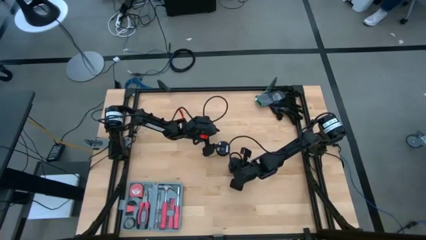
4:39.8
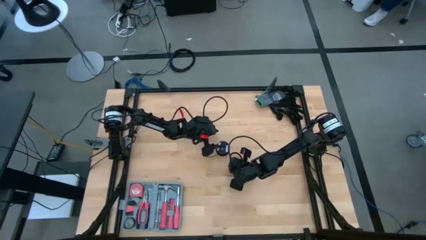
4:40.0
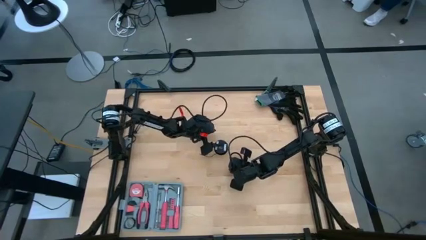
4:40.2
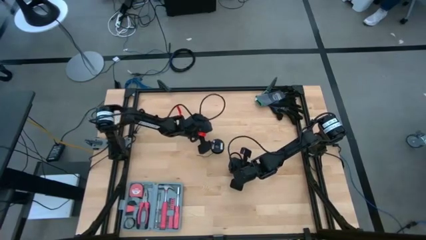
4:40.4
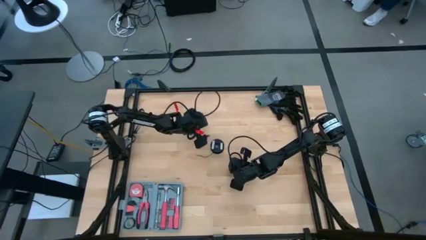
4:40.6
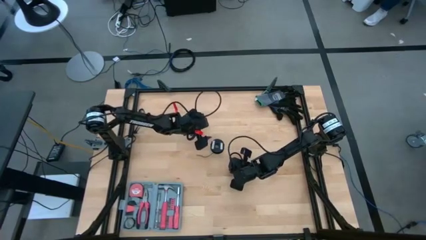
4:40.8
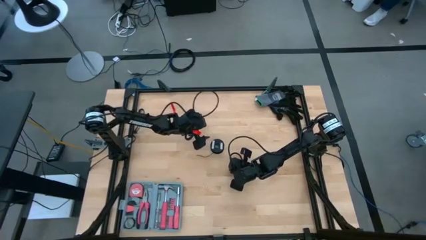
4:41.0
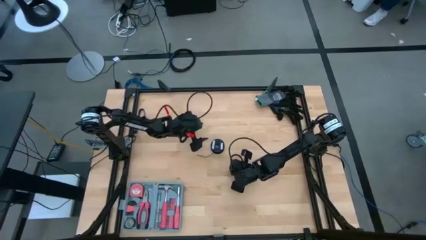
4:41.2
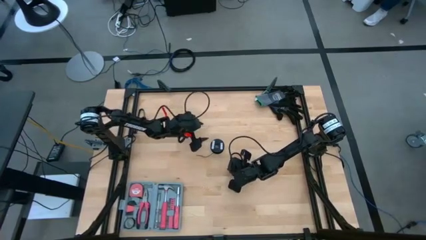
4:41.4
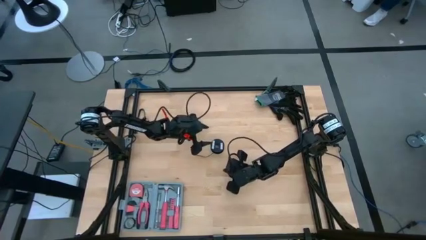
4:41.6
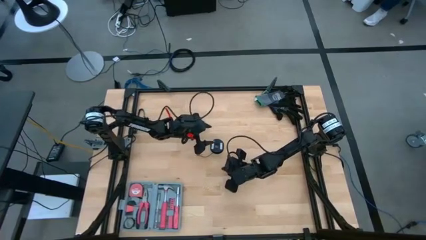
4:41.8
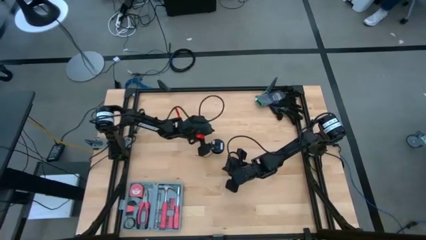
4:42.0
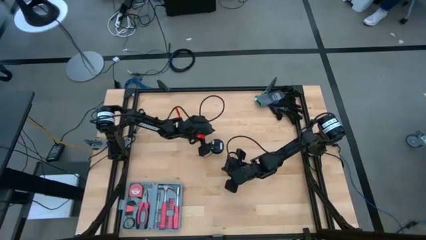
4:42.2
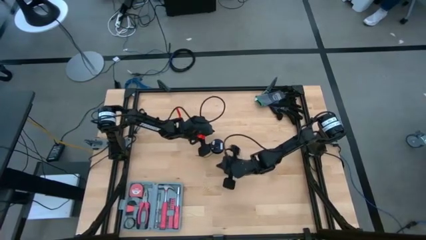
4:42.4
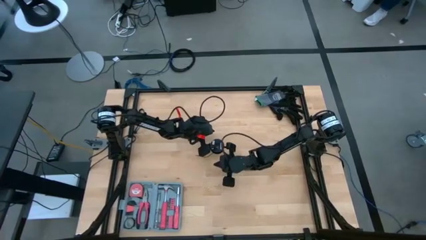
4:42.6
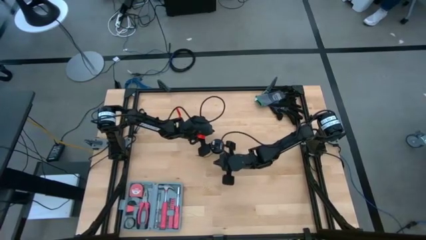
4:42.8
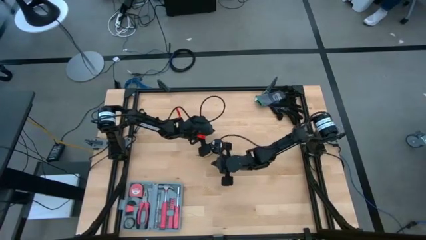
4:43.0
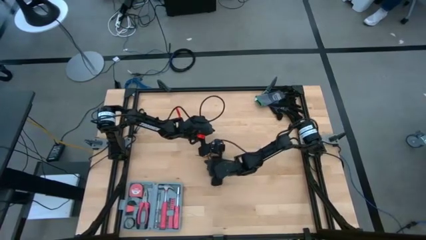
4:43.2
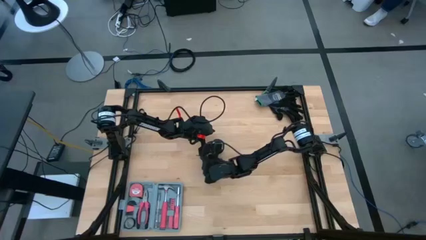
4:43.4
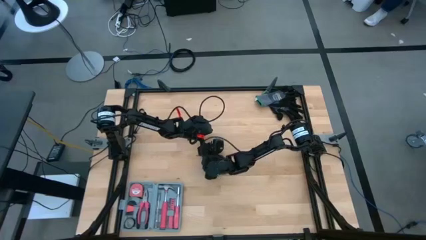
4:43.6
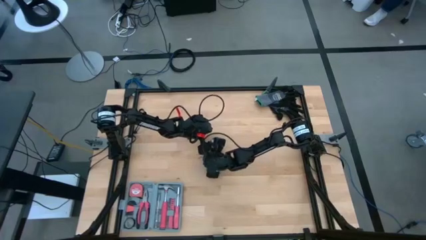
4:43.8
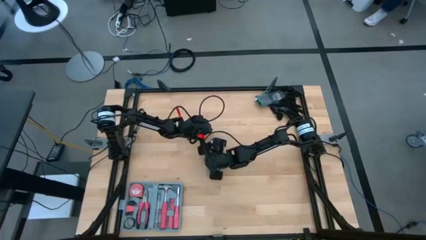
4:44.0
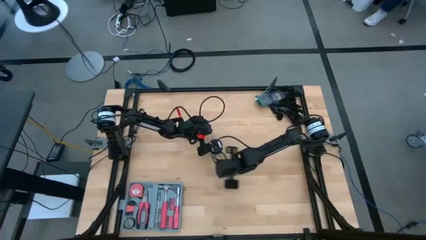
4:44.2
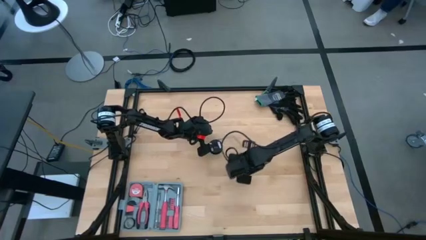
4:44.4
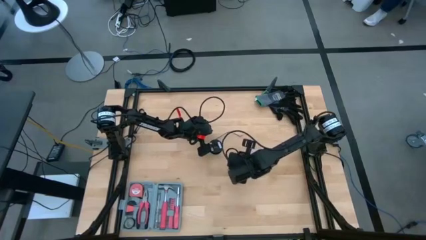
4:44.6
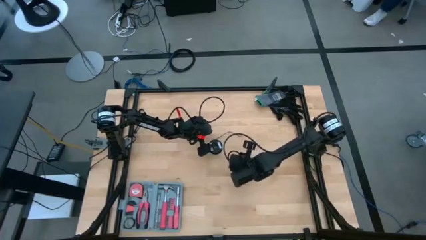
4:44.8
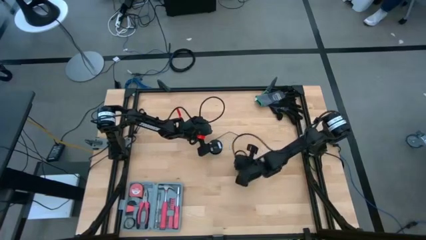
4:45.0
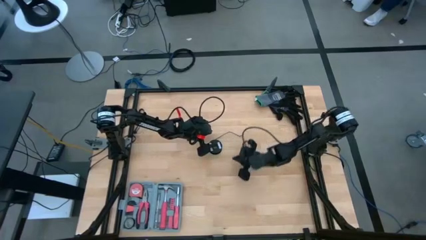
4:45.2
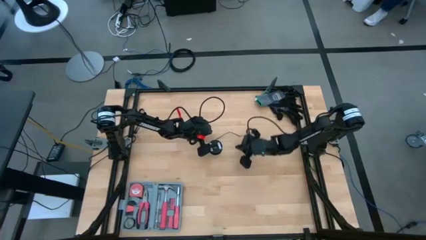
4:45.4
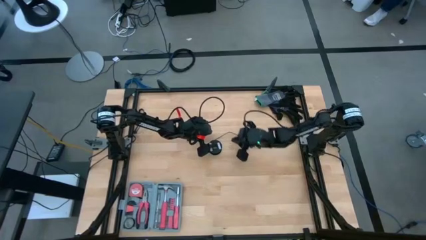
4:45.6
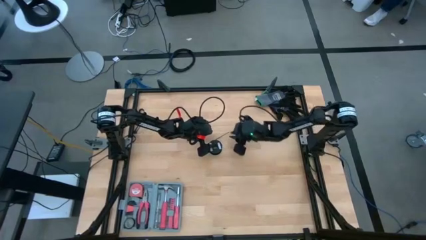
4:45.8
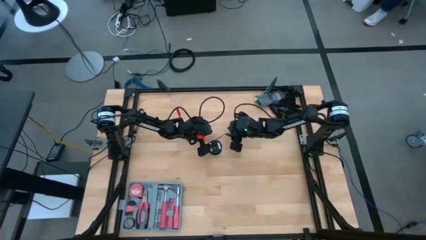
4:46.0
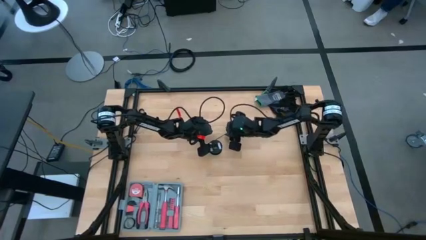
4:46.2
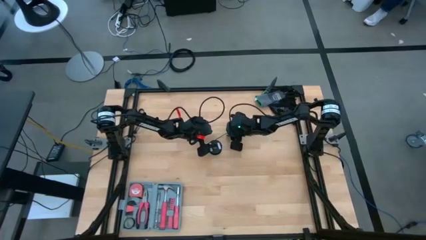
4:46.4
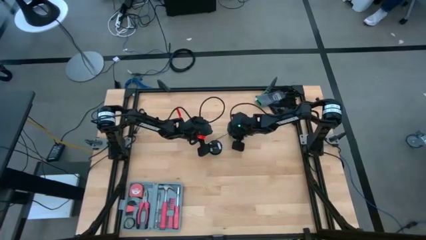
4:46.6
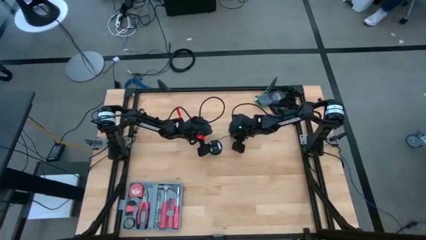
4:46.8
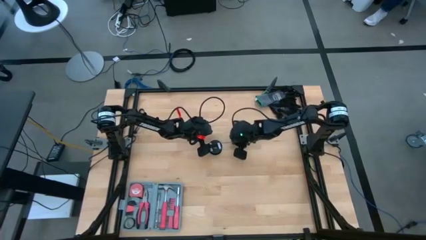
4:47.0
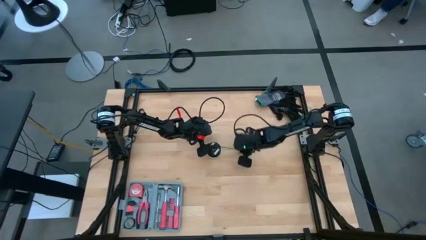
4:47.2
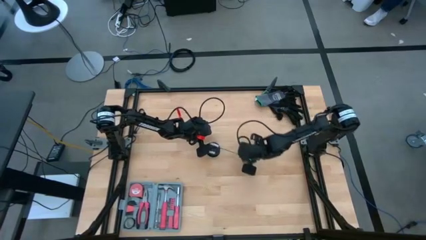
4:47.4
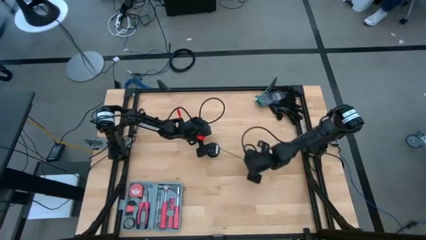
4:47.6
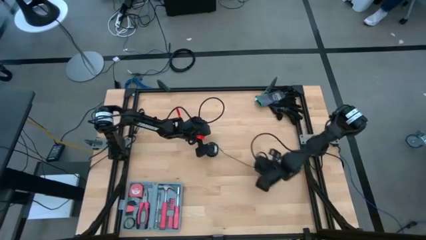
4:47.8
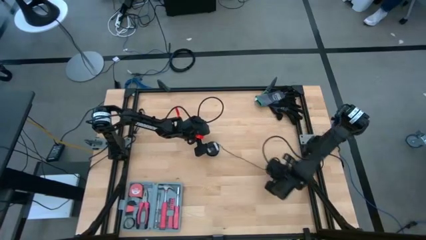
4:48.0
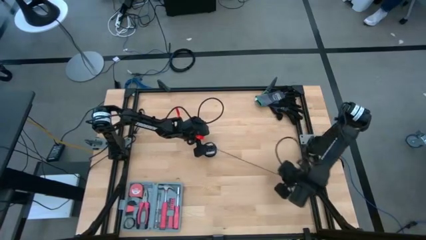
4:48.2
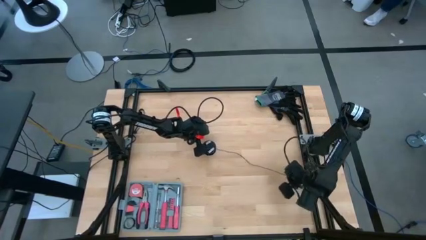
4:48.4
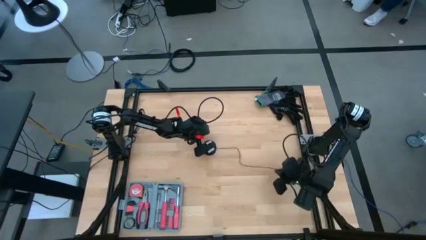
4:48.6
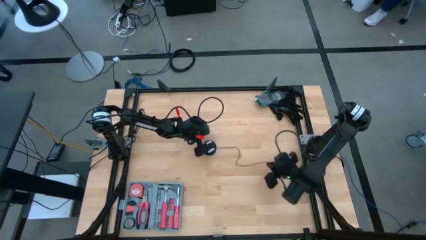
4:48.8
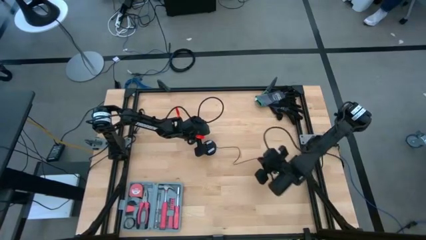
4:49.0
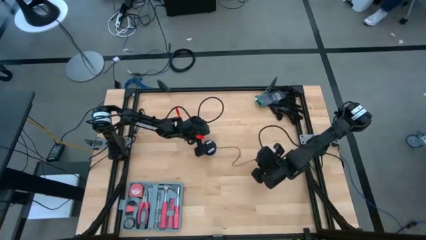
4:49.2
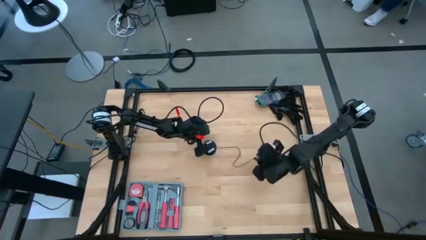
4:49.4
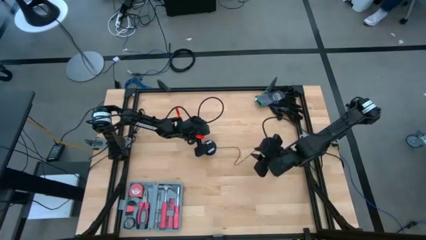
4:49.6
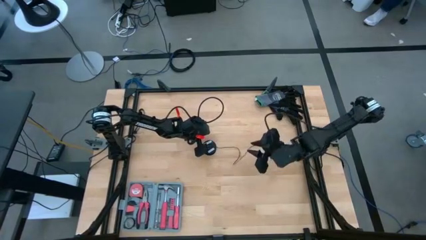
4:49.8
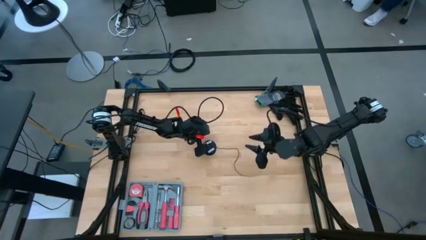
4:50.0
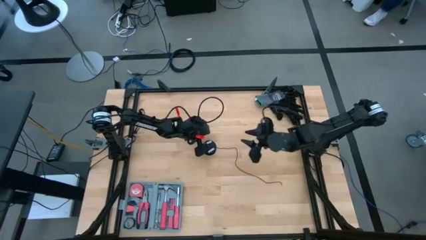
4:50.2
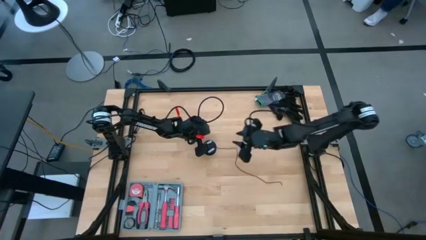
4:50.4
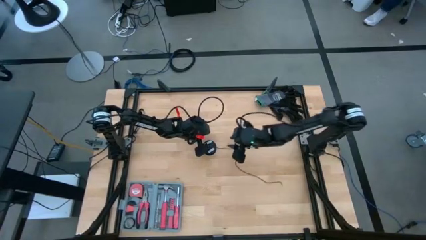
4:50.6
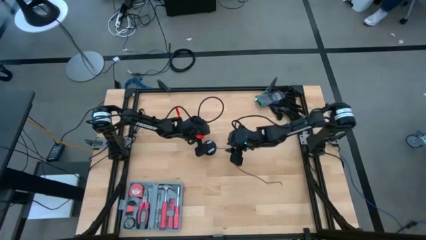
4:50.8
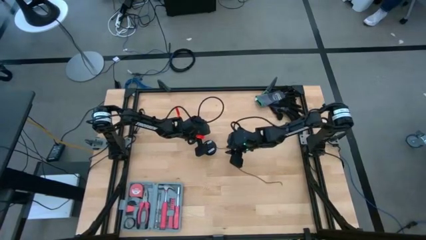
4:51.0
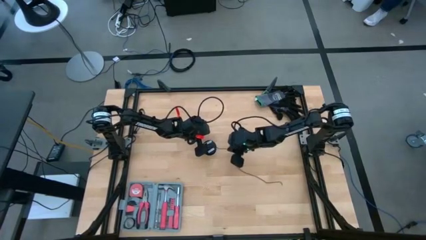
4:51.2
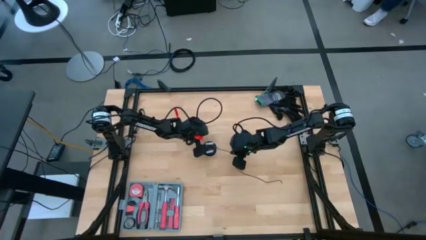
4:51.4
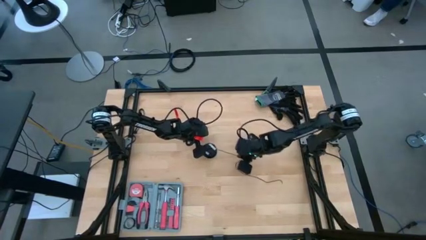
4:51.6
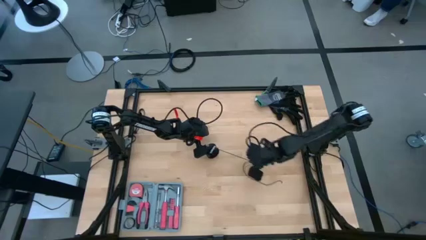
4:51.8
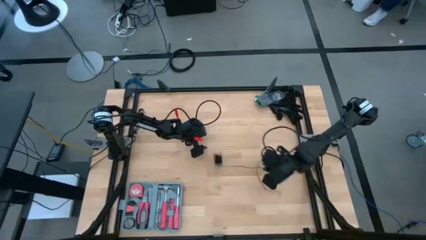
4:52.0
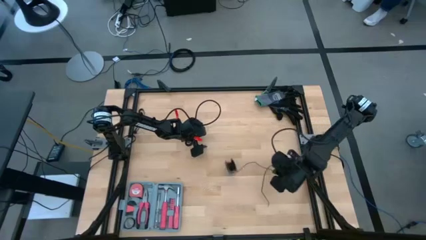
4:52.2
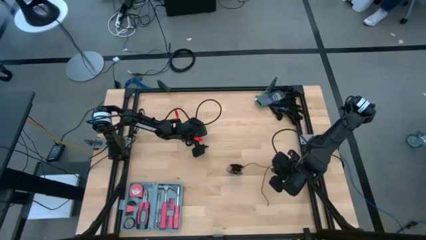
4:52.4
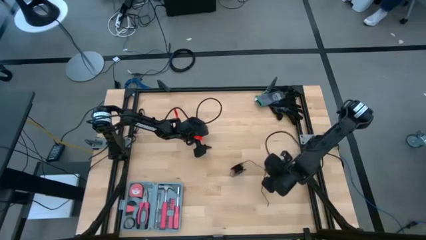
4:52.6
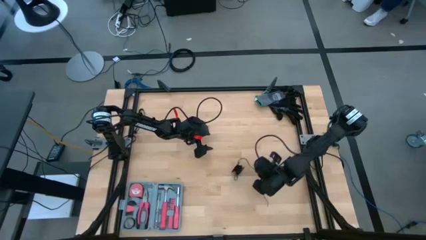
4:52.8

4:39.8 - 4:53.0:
Task: Coil cords
Uncoil the black wire from the spool
